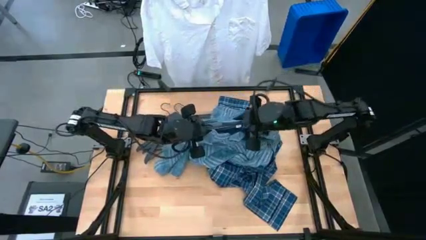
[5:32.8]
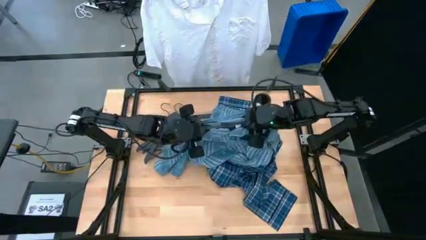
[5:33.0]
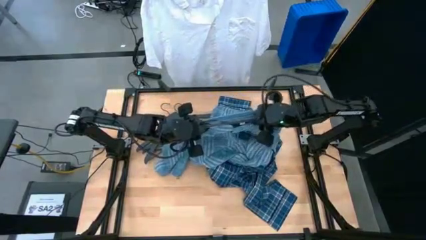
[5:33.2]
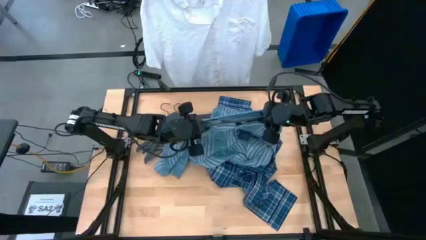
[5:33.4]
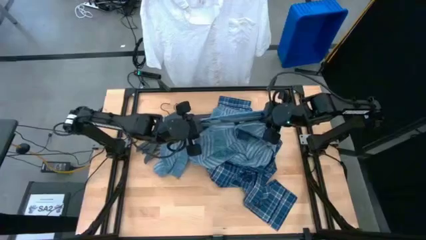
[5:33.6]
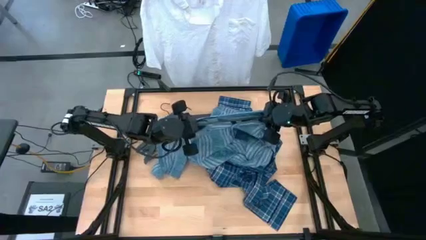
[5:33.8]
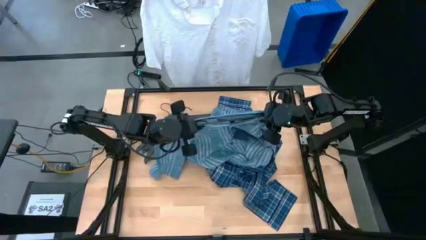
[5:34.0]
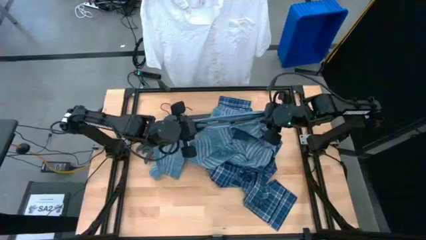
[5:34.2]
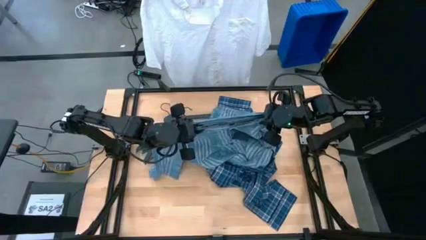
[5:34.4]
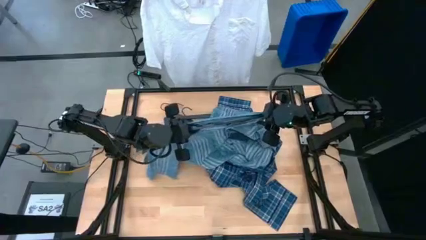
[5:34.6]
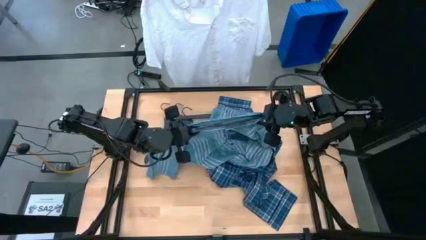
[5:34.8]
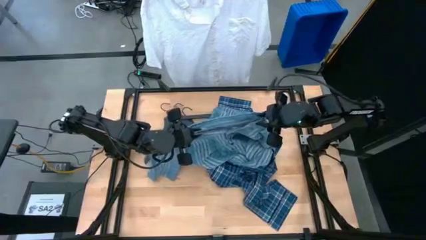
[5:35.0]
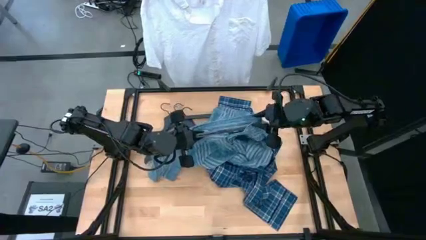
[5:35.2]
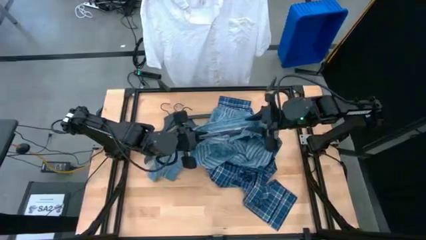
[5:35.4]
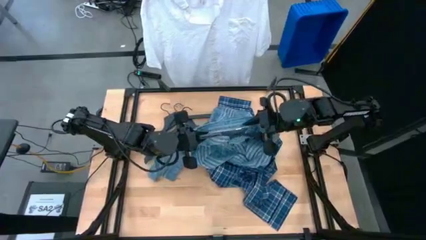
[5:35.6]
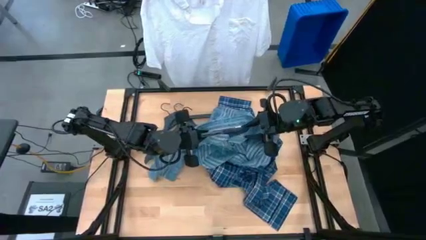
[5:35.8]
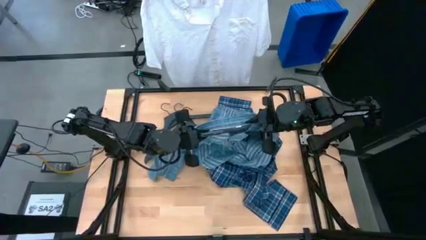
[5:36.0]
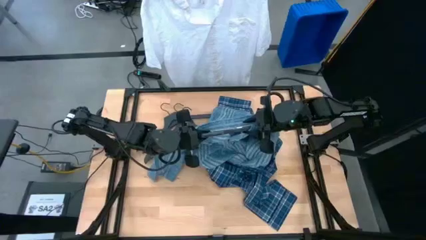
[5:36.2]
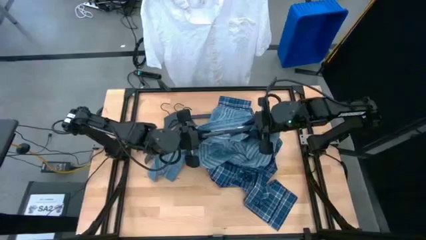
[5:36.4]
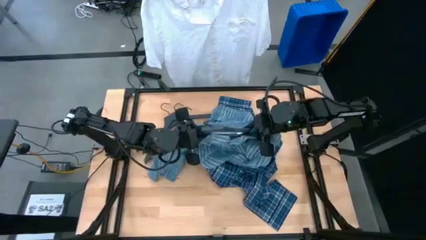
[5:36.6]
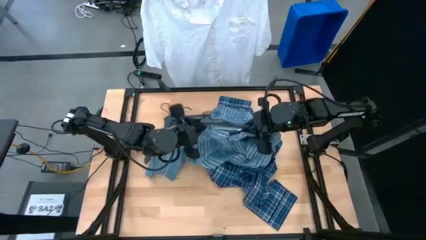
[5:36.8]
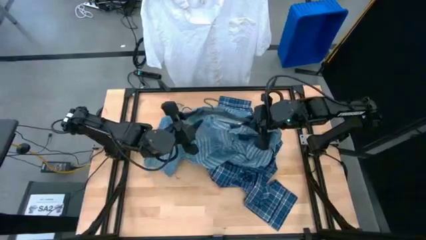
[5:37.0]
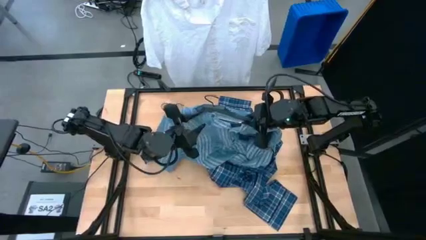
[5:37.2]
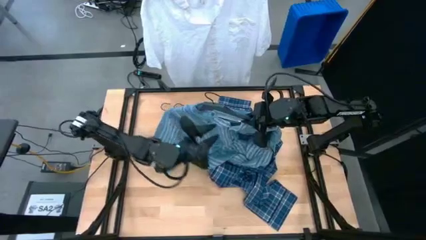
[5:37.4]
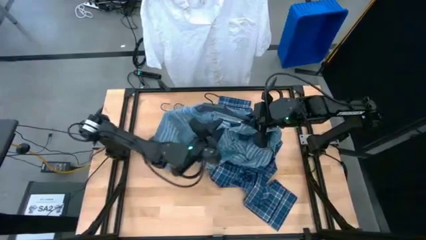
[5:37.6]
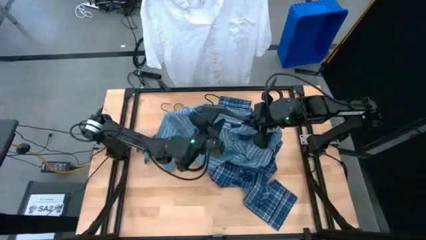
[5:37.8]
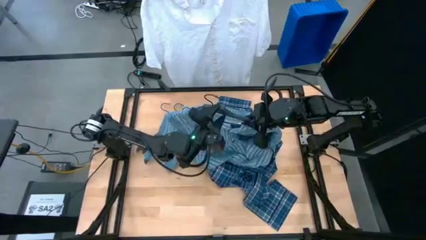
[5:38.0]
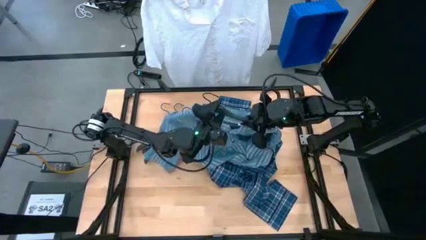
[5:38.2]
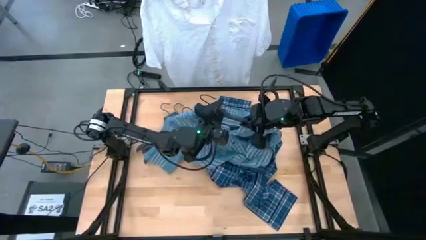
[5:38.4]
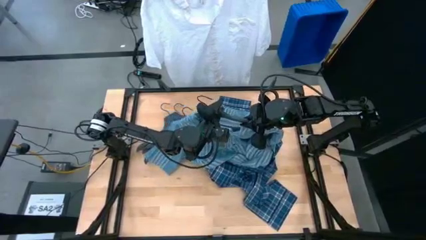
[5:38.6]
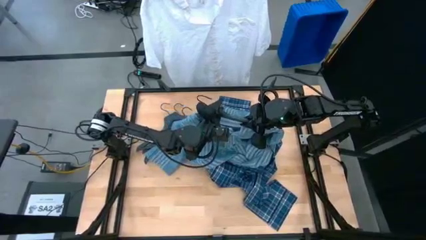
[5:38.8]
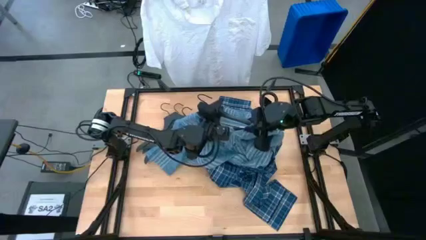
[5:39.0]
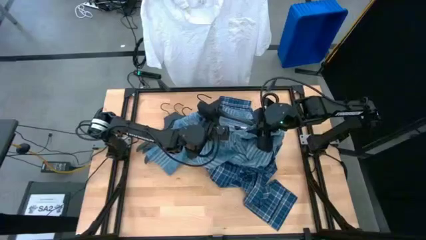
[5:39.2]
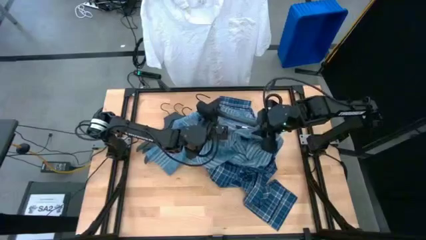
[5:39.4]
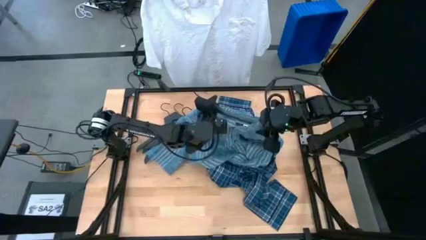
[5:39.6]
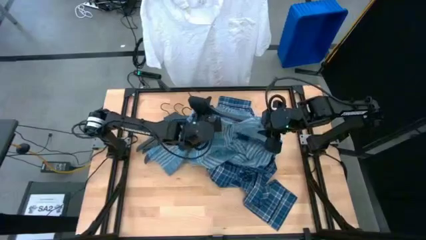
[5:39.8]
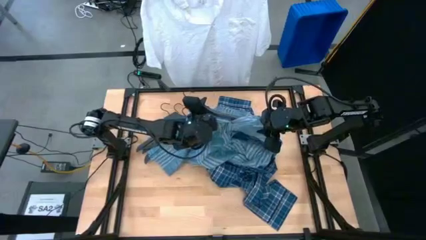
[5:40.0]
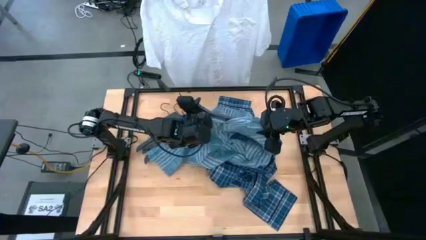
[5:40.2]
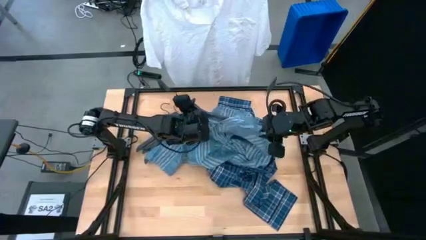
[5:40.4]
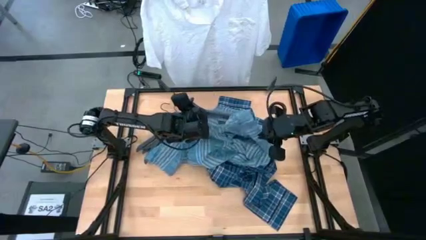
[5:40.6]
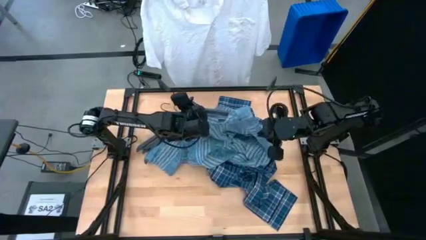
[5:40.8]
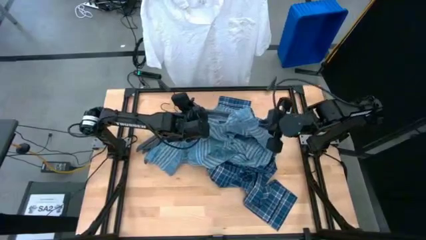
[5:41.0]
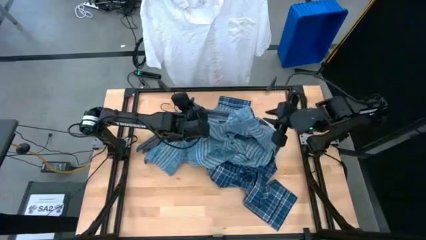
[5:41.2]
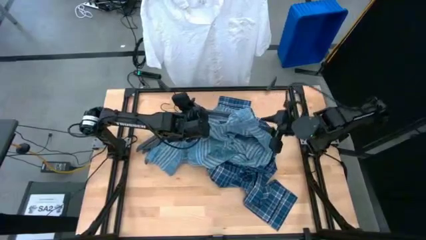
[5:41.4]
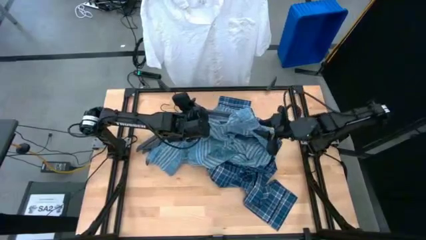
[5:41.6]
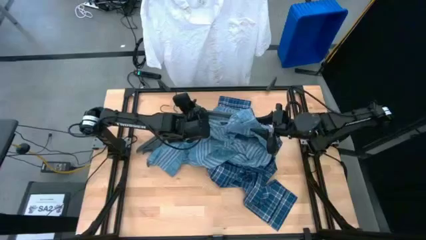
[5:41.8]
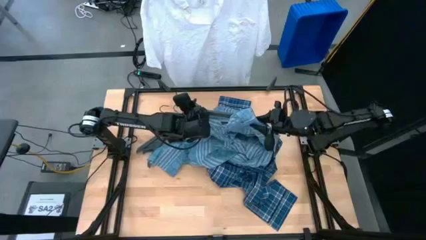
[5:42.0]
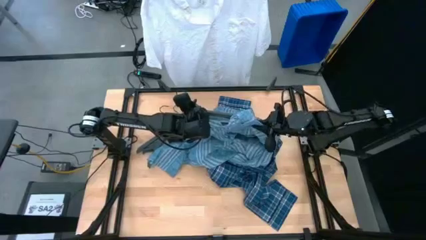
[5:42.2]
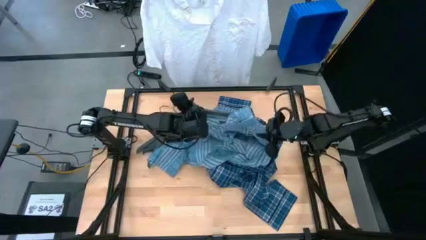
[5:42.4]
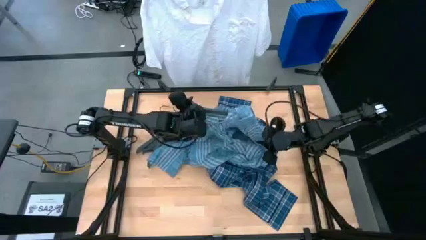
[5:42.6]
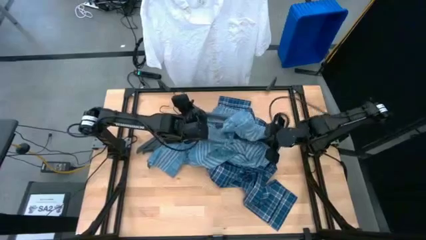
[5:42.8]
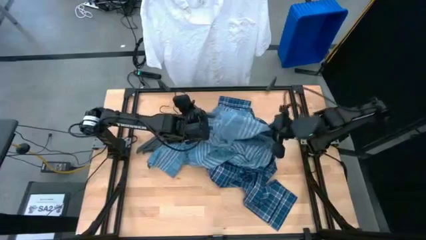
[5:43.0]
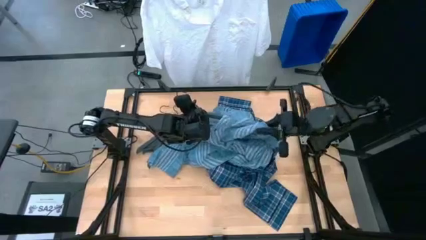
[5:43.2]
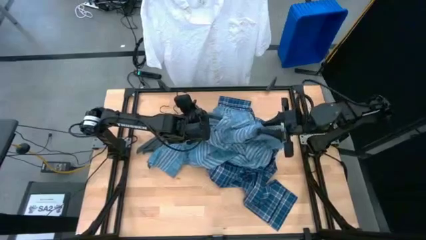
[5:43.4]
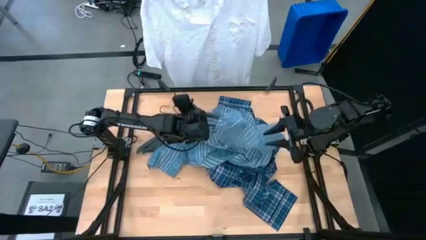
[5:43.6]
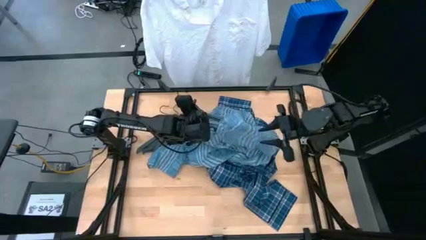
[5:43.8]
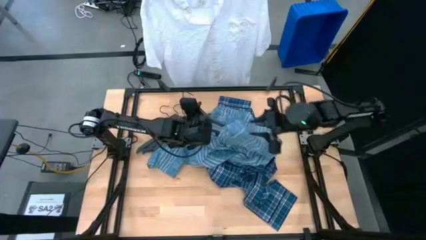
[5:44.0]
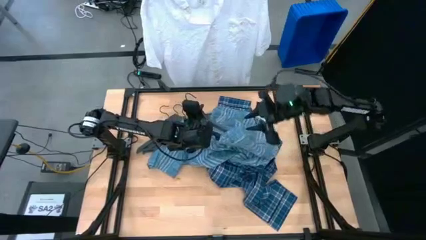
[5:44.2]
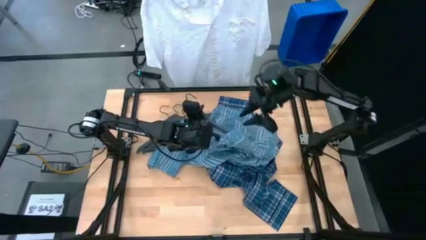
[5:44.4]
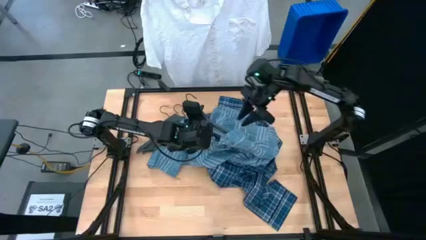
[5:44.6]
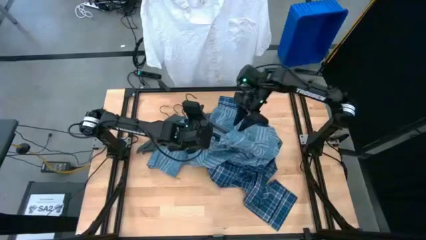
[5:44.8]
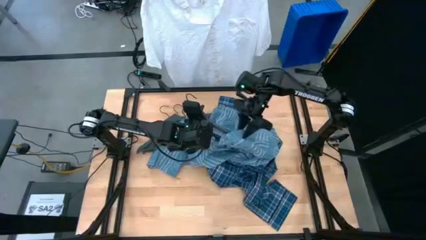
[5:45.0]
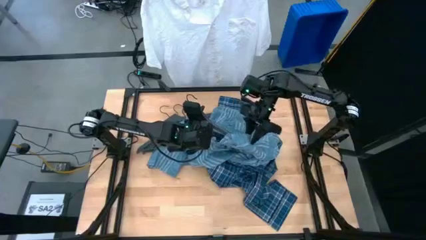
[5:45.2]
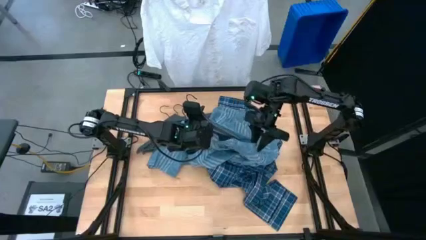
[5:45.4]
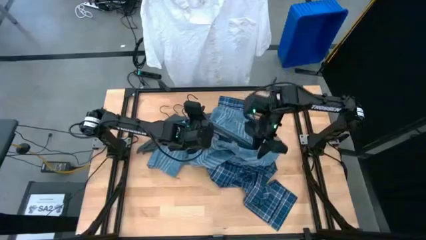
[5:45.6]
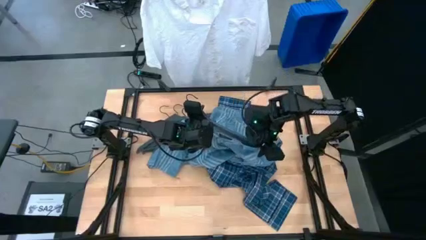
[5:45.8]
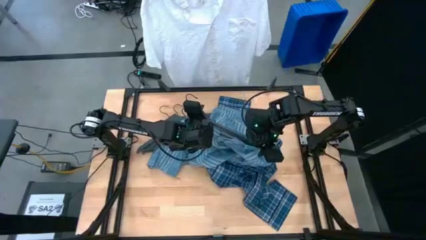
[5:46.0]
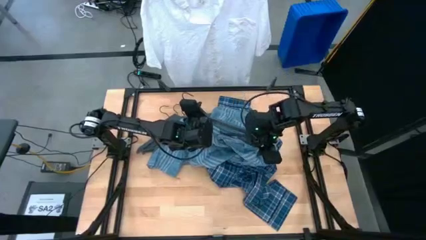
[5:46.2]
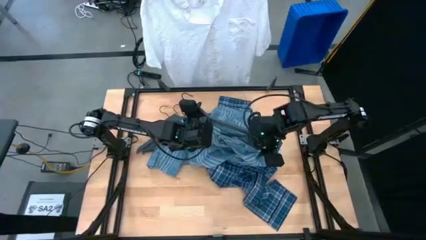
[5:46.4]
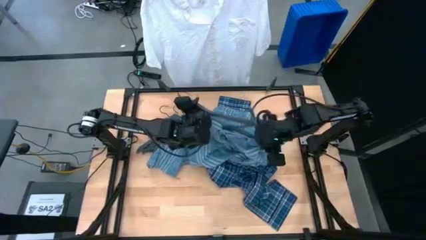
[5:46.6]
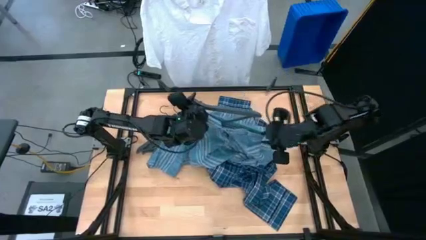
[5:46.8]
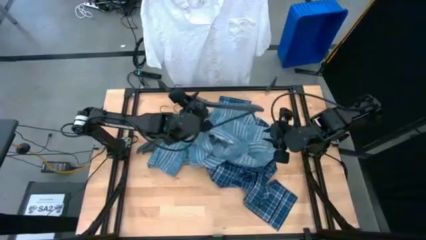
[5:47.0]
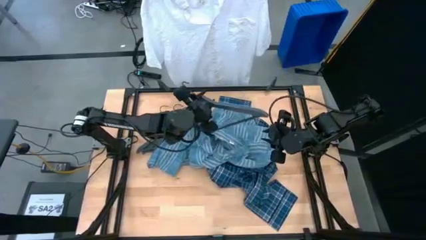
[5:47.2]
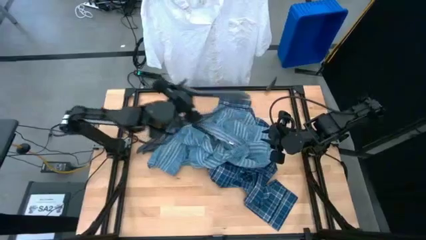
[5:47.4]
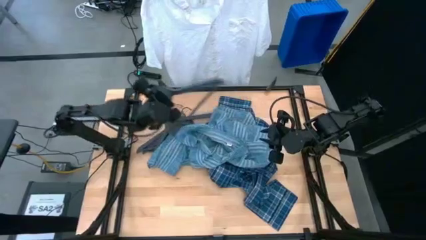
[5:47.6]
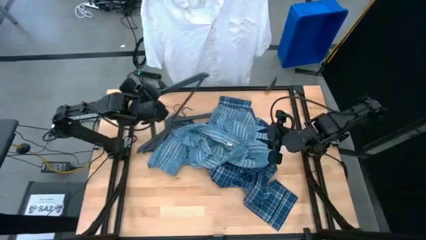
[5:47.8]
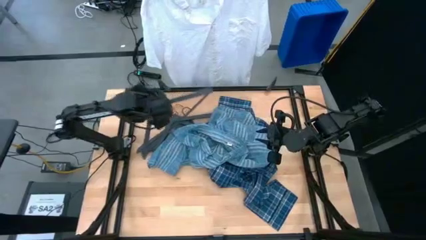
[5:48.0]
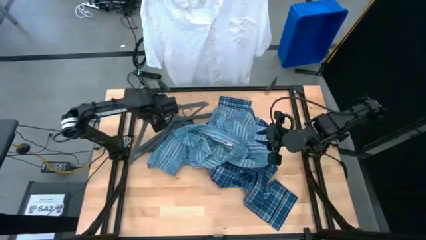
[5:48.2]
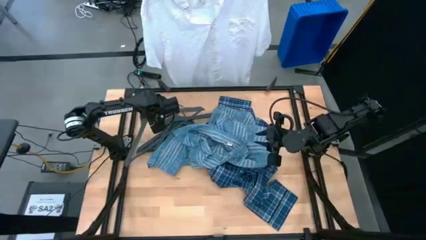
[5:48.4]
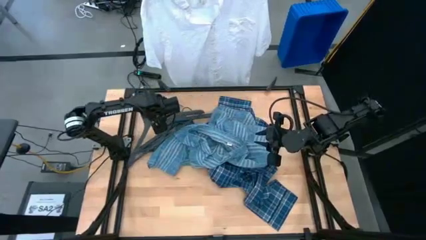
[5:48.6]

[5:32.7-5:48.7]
Task: Hang clothes
Remove the black hanger from the green shirt
